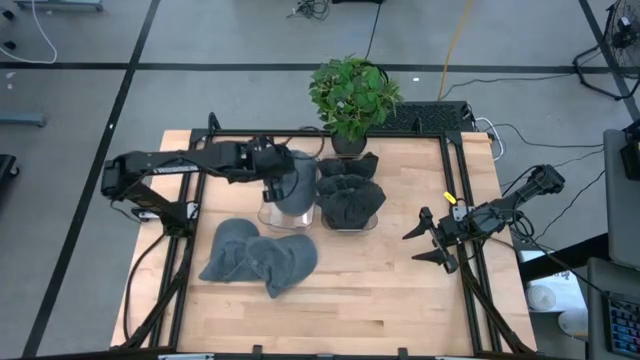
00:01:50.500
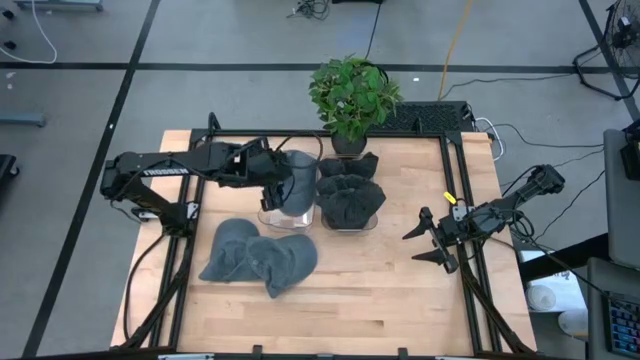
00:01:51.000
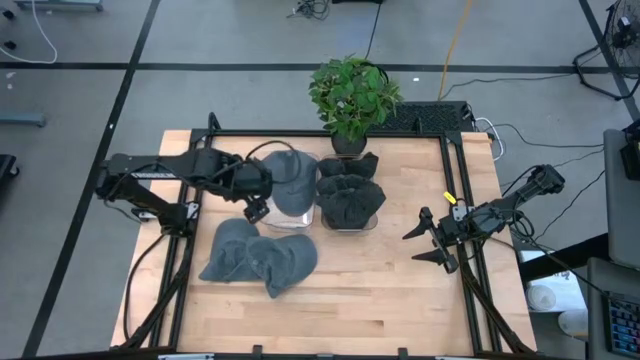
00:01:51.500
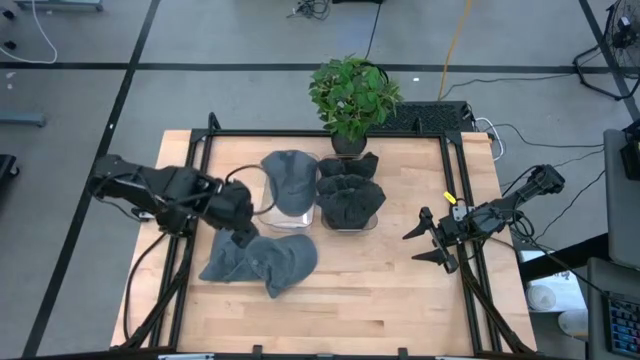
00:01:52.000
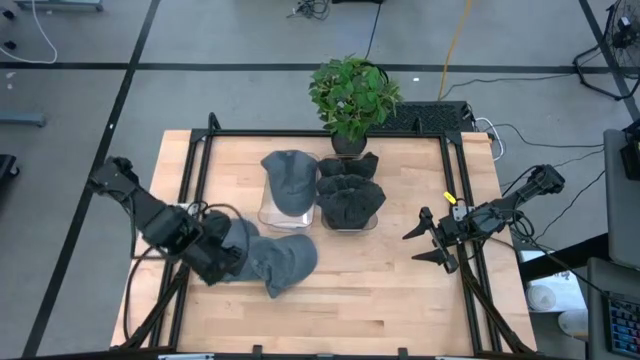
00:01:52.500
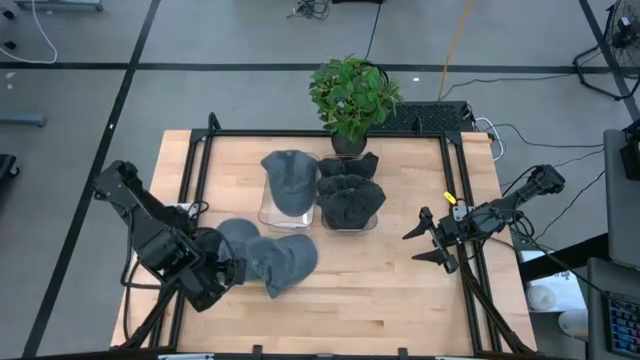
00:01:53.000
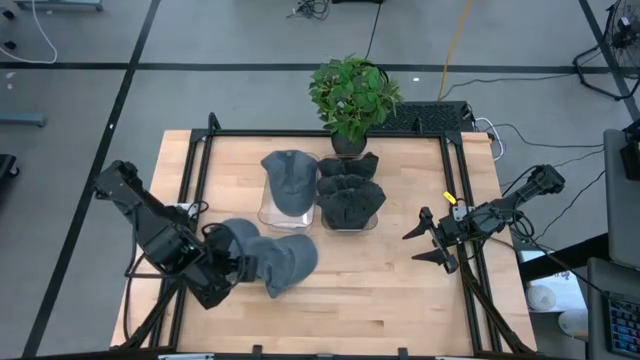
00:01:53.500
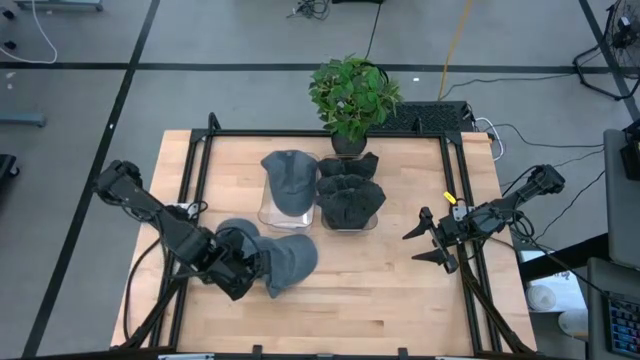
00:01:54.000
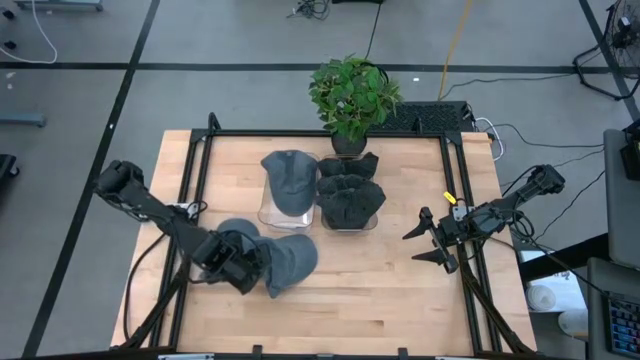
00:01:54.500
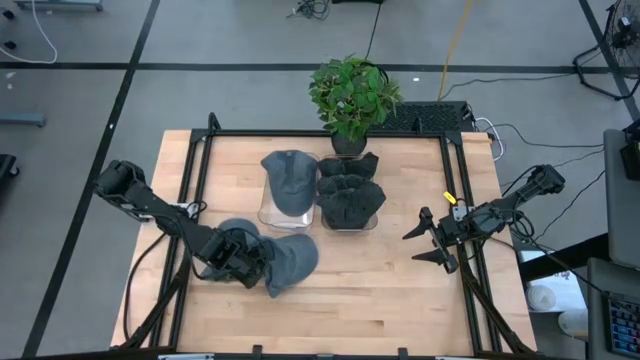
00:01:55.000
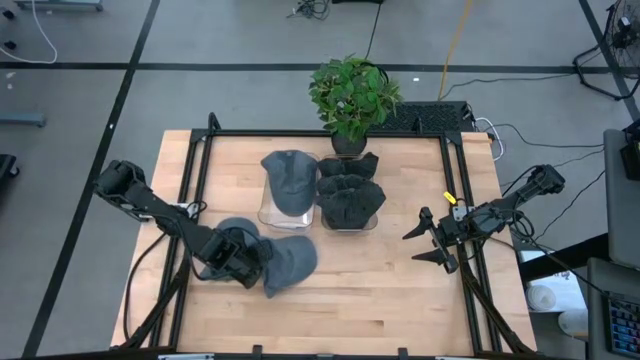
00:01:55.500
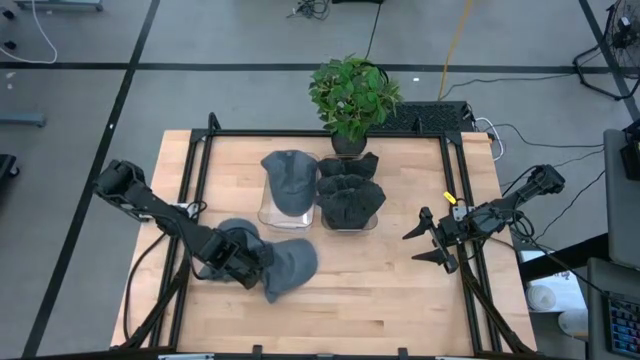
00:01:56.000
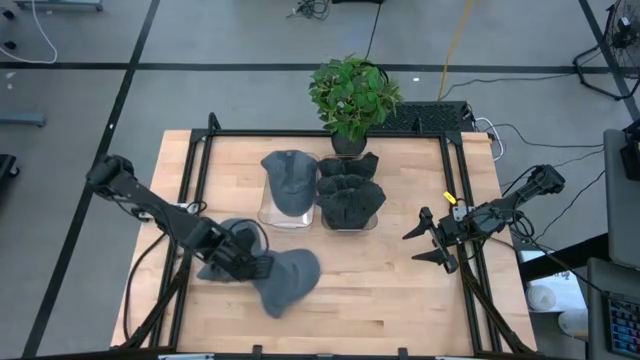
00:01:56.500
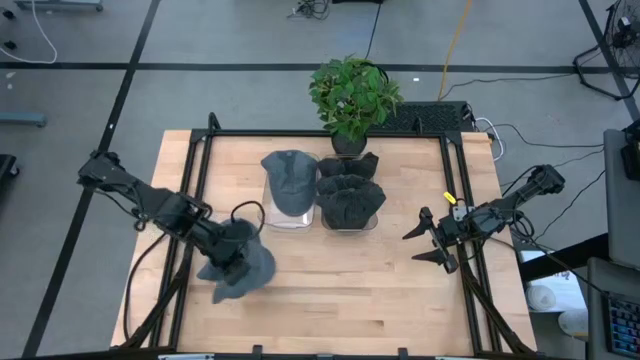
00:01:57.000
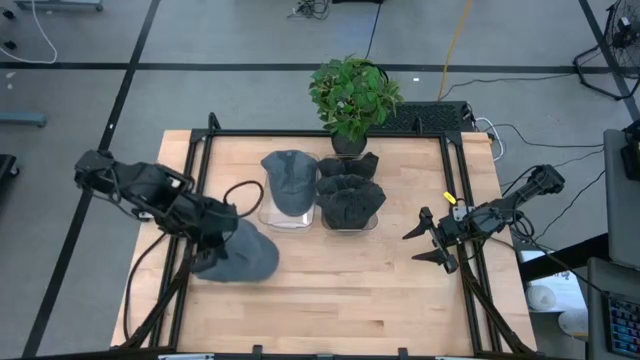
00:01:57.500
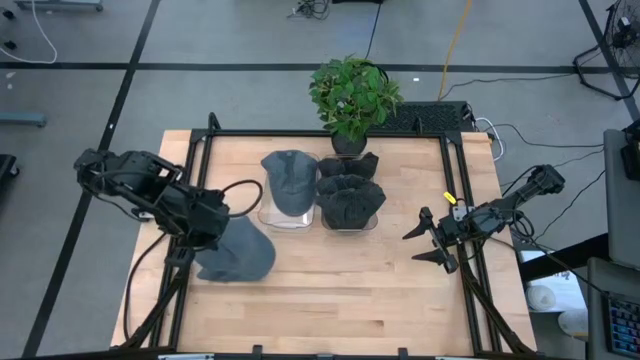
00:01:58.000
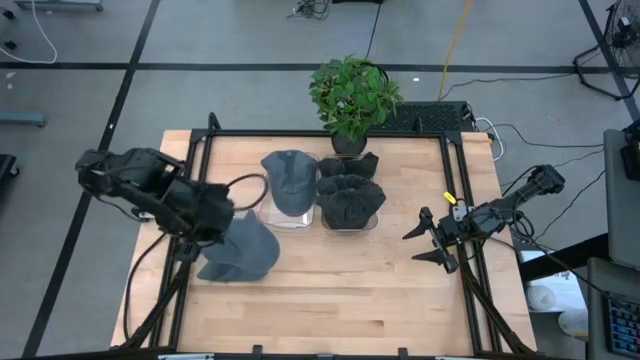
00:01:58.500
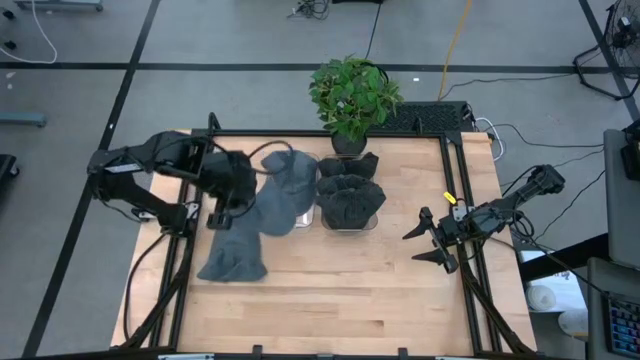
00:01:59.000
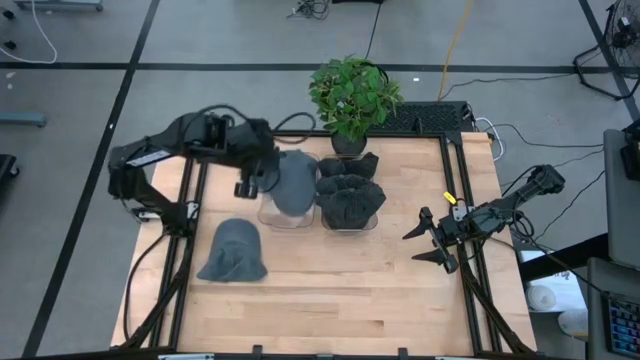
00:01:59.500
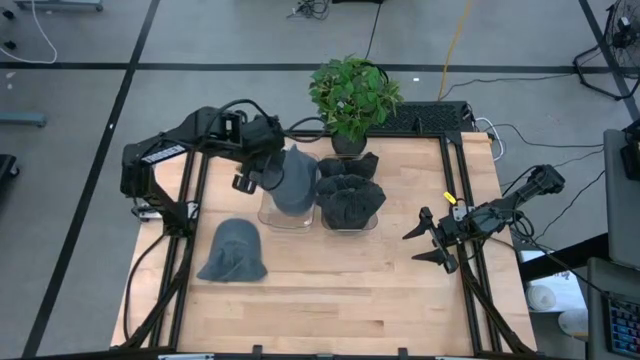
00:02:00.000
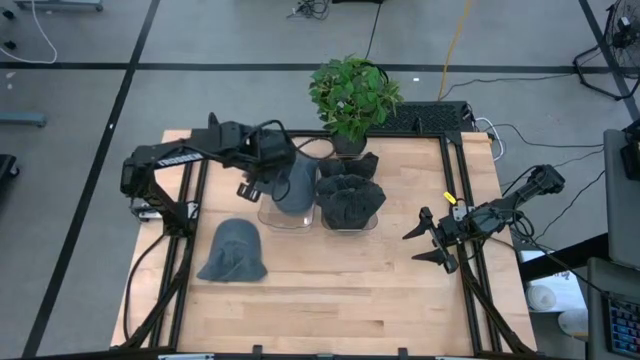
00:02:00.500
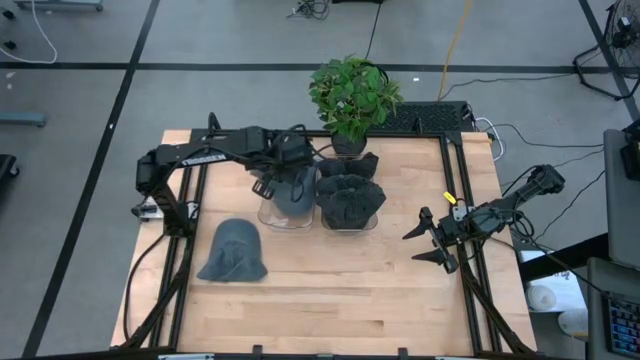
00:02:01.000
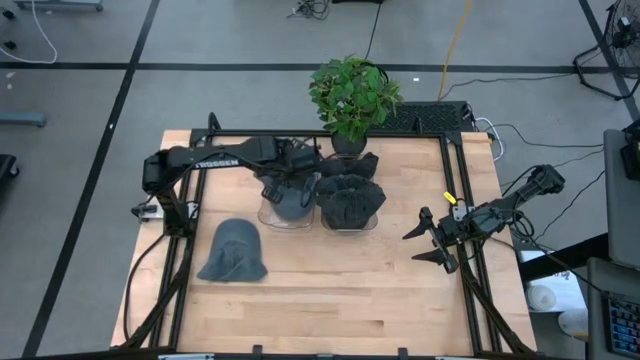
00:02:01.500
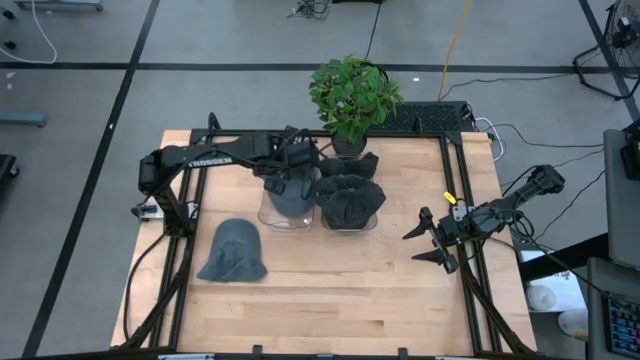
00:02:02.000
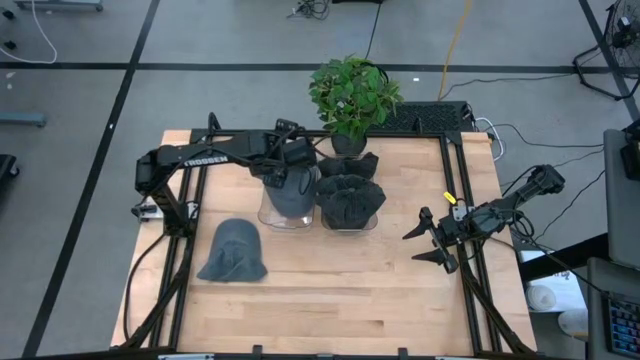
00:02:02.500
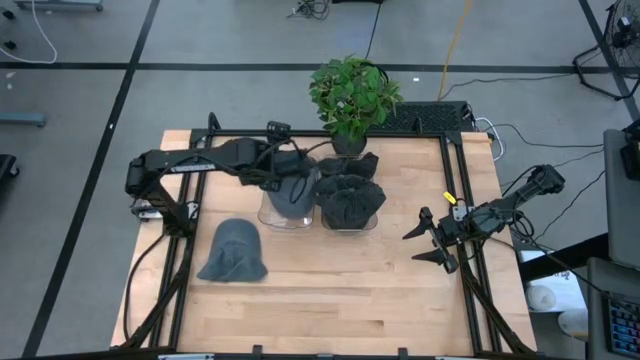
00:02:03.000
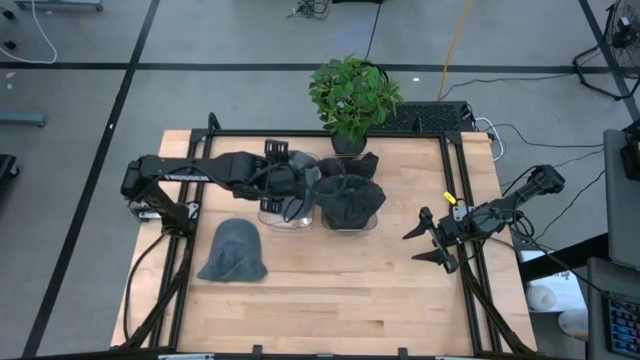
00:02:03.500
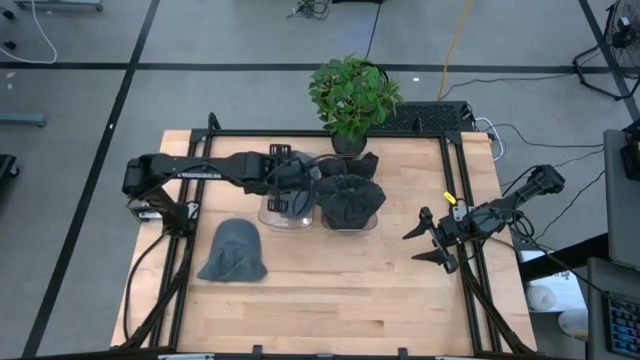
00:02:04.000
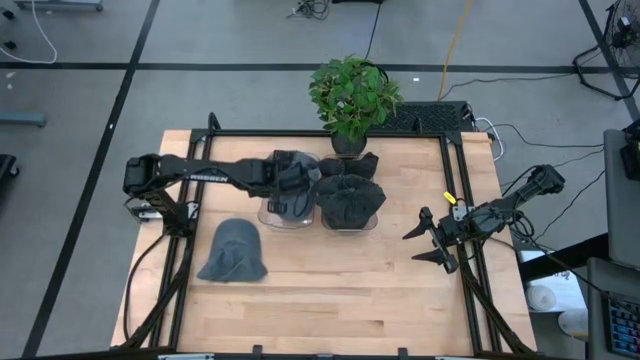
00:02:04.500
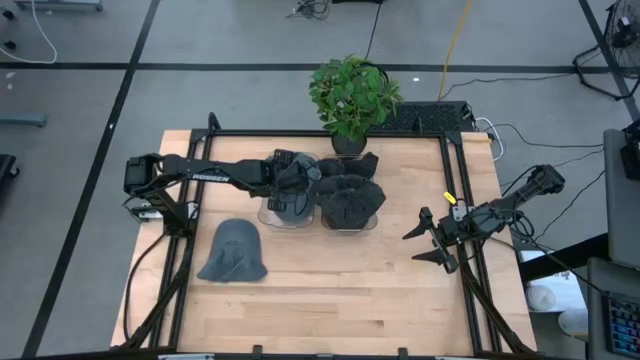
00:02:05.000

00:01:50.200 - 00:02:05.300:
Task: Pick & Place hat
Put the right blue cap into the left transparent bin

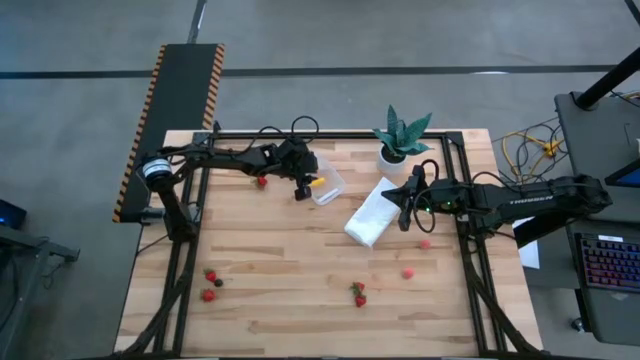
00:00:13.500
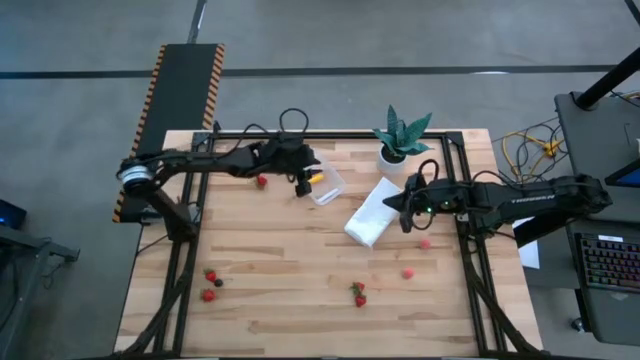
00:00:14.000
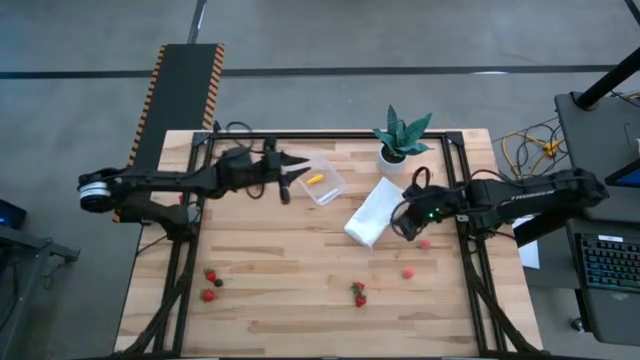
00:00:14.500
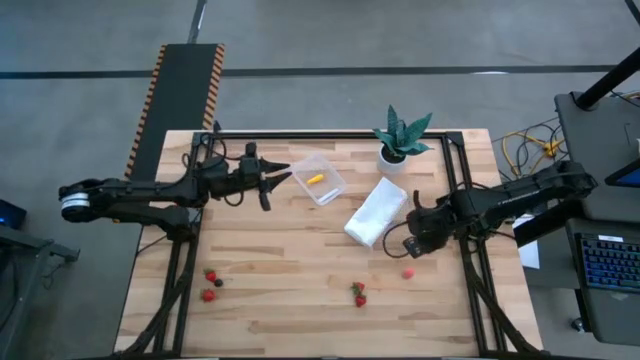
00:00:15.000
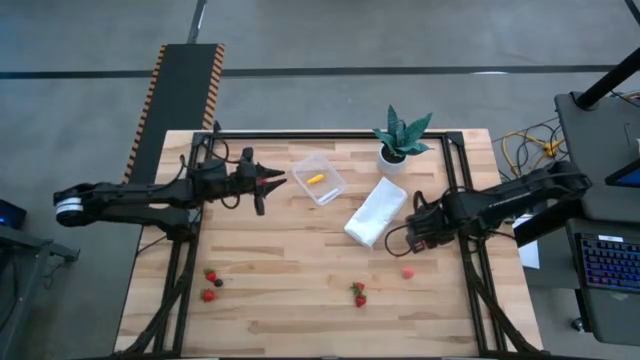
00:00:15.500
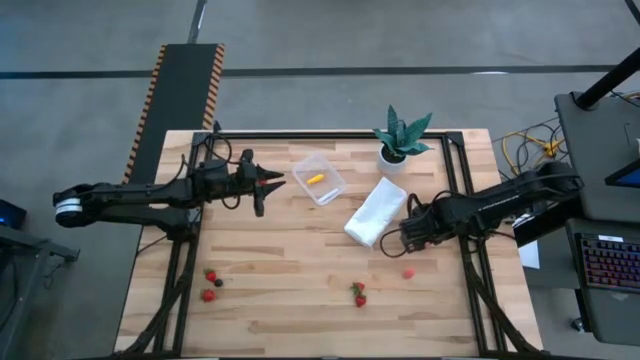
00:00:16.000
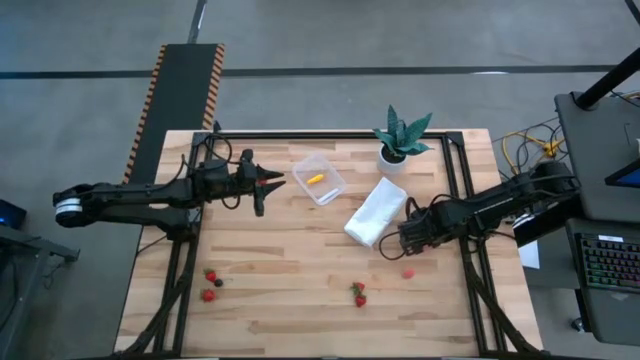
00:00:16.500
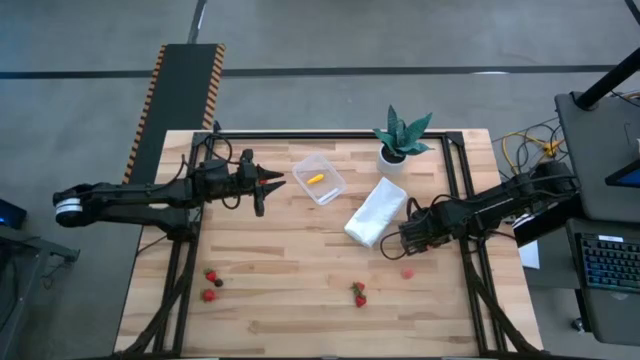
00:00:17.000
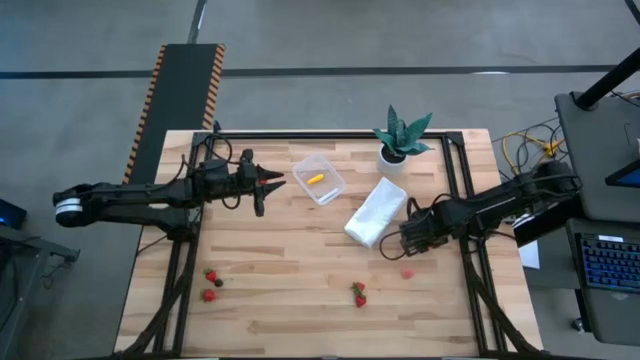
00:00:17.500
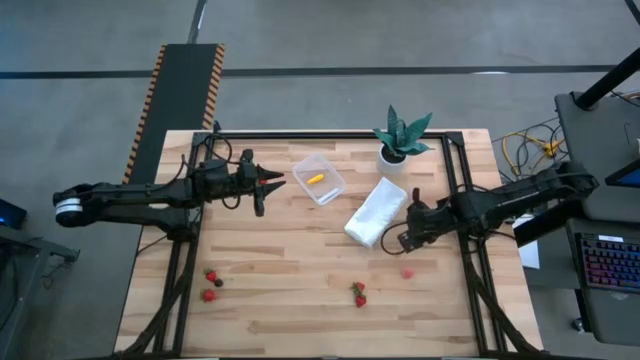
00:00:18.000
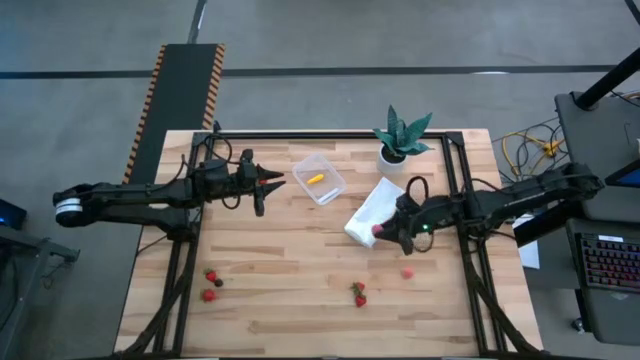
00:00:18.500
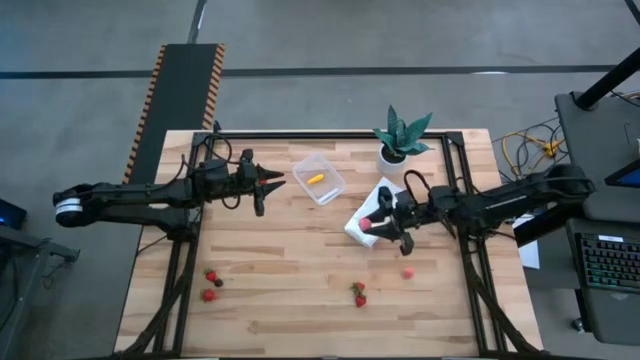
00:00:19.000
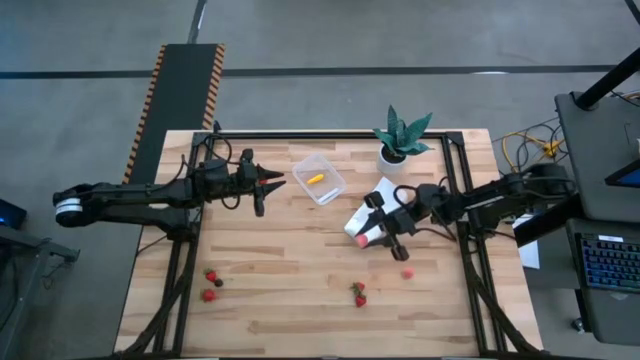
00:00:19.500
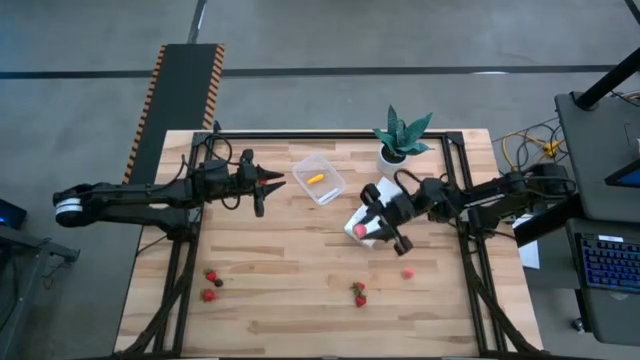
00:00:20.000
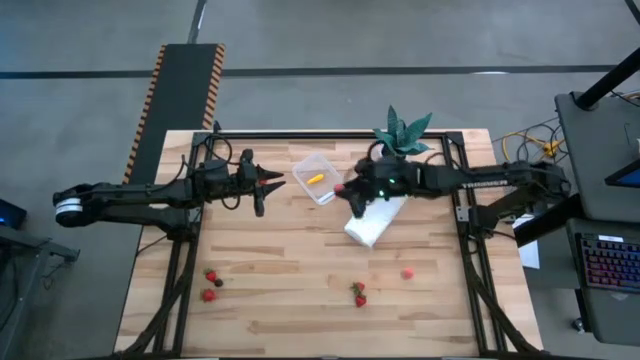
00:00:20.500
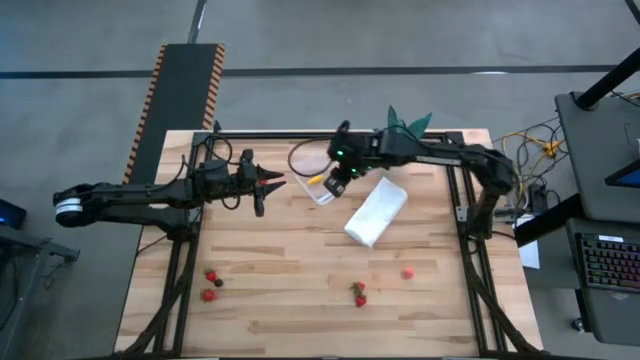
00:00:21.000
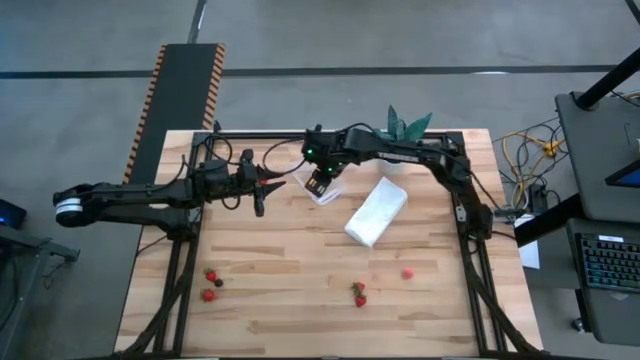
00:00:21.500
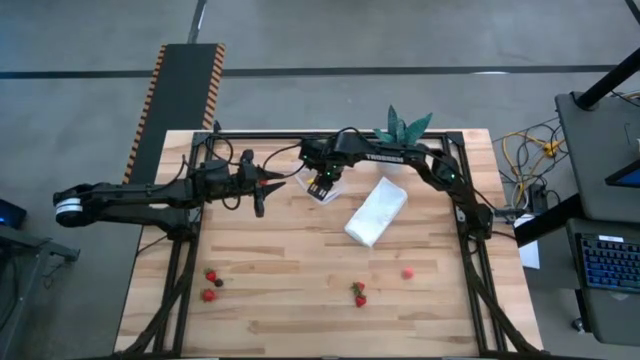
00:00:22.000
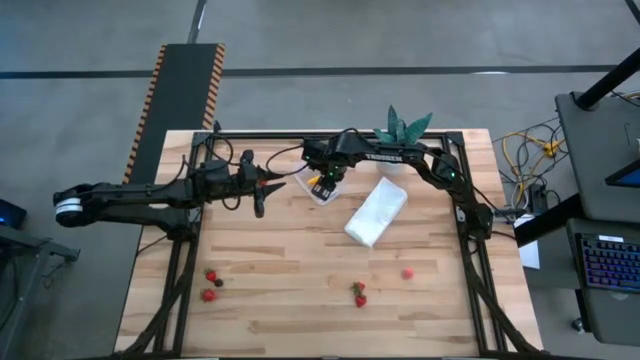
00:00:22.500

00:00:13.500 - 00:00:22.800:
Task: Pick and placing Produce into tupperware
Put the top apricot into the transparent bin
